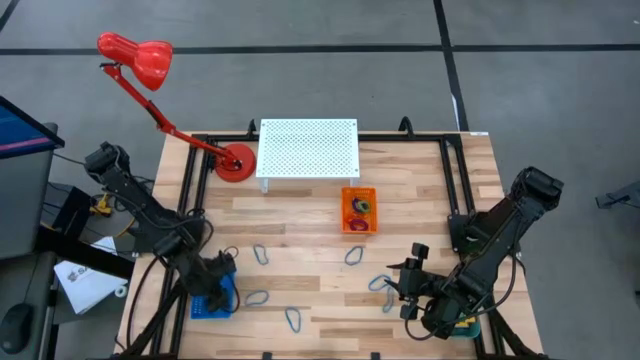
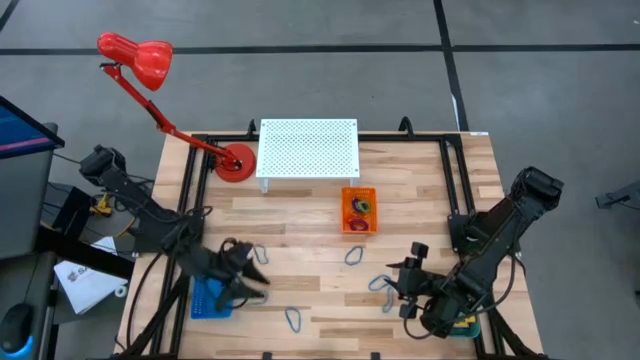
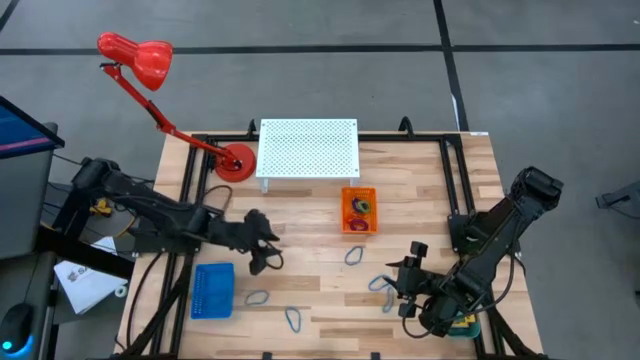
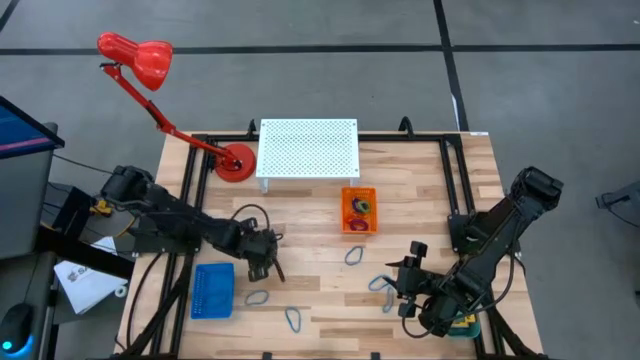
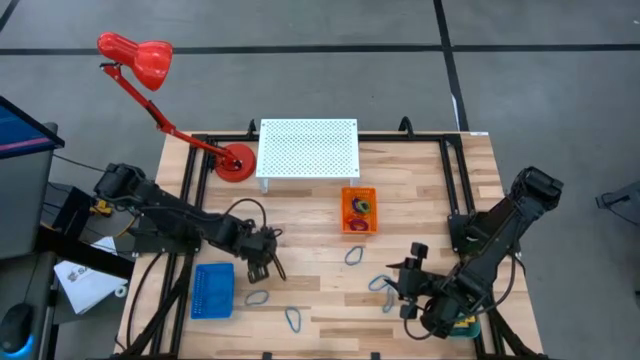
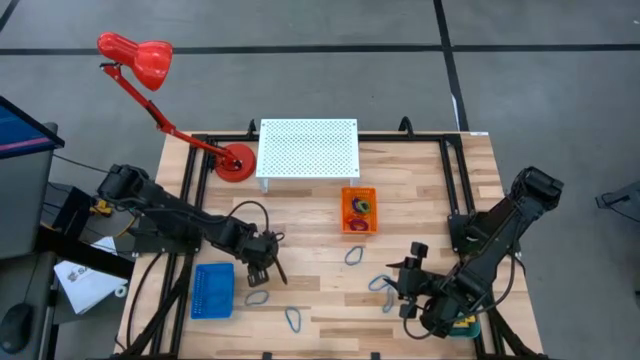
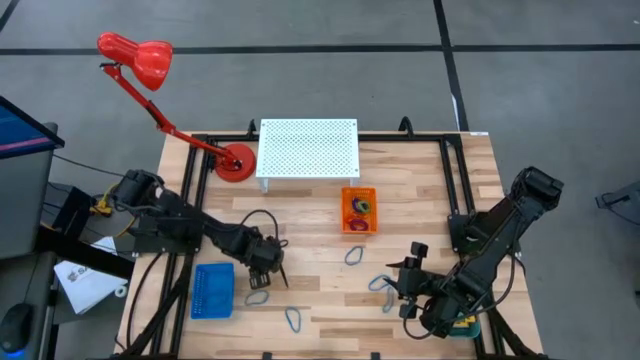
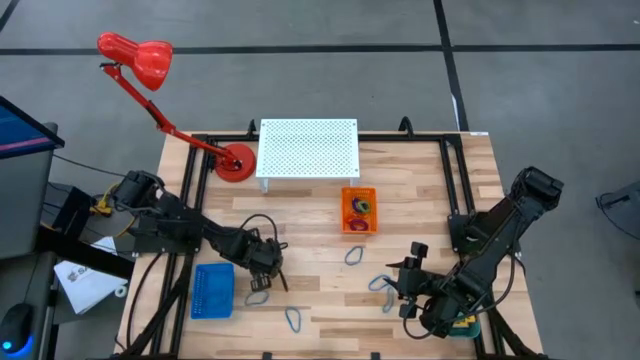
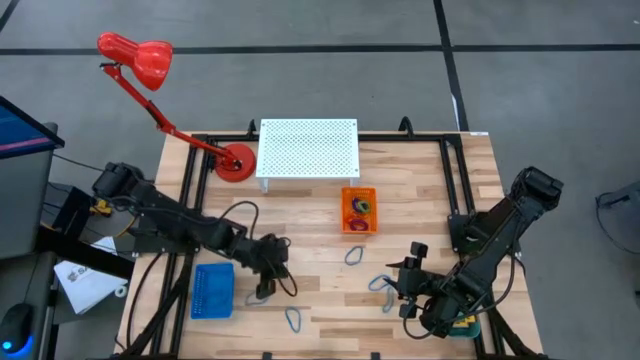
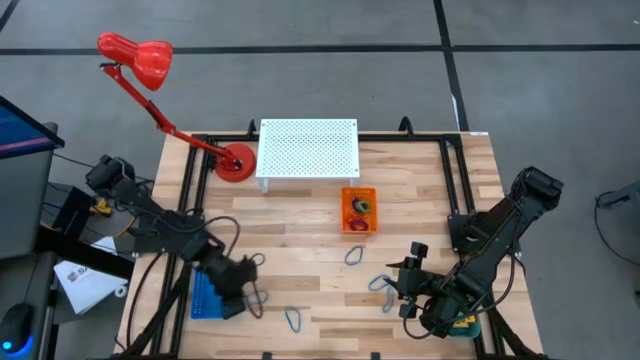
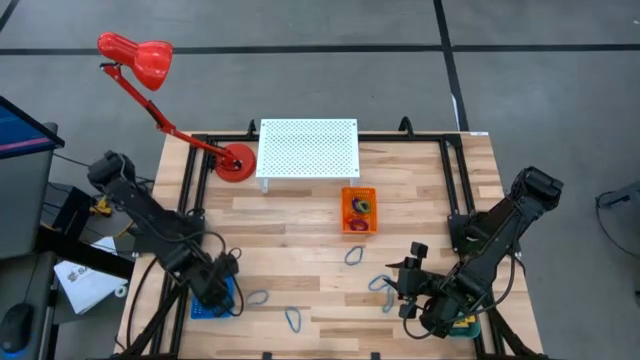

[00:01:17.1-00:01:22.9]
Task: Pick & Place Office Desk Supplies
Put the blue rubber band into the blue bin

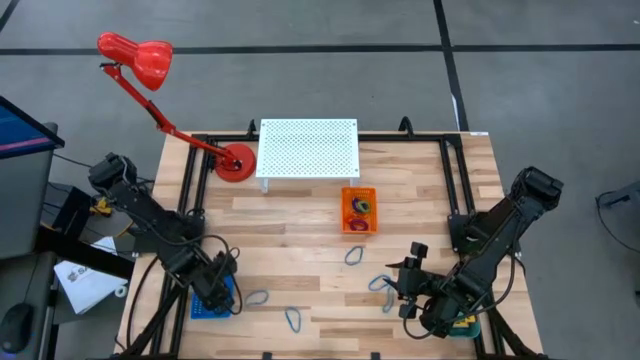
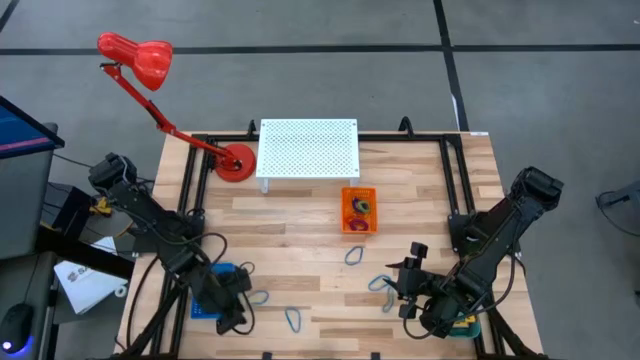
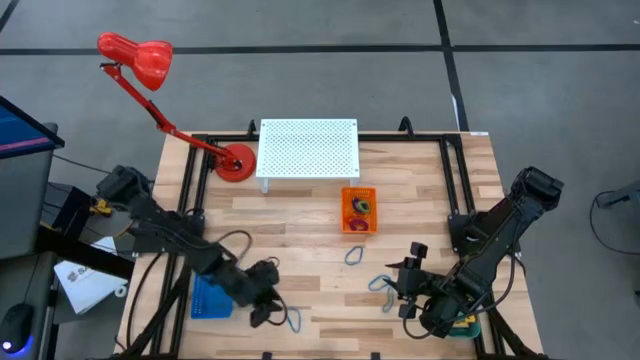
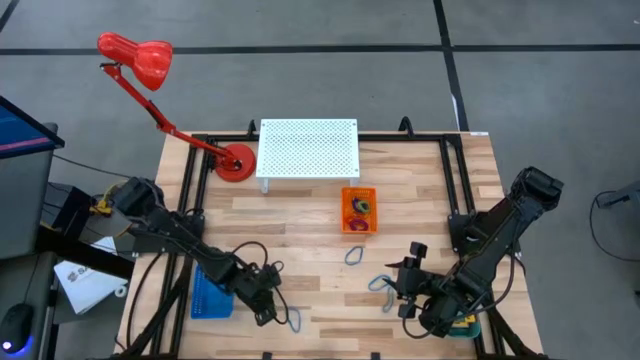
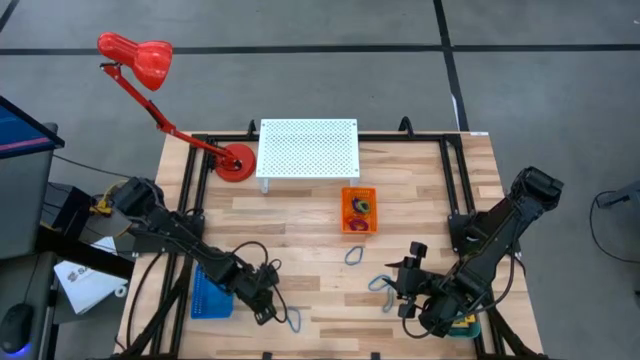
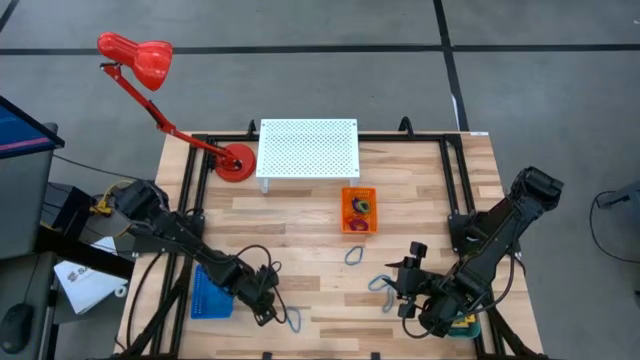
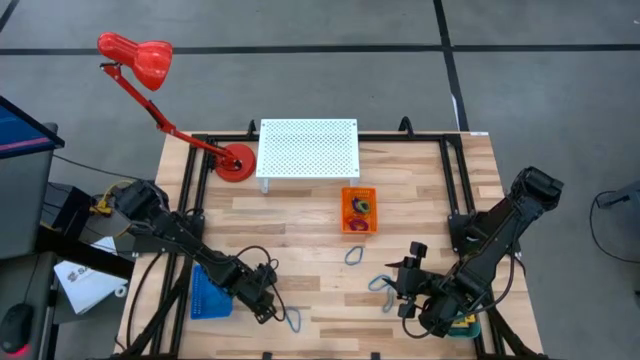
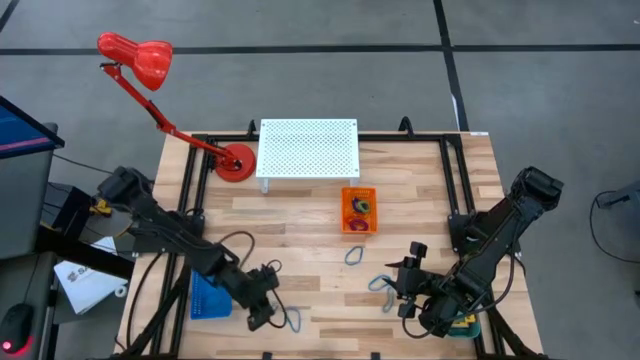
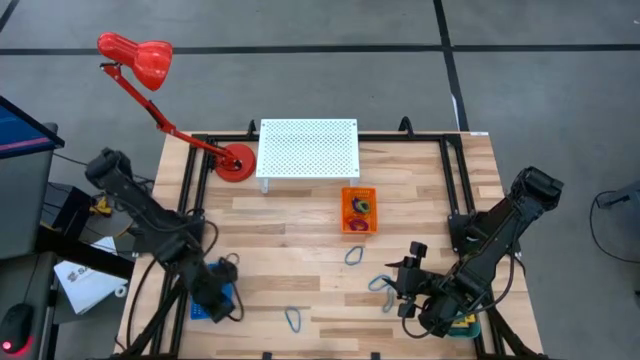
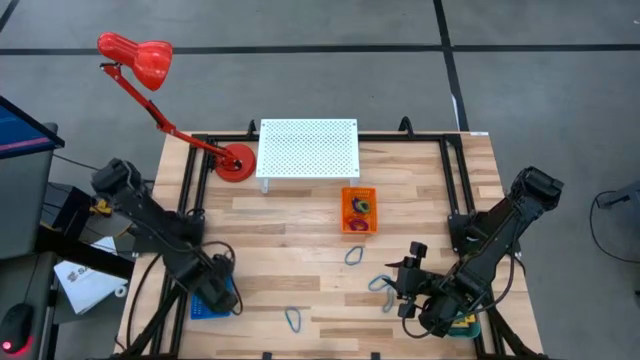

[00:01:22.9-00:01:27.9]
Put the blue rubber band into the blue bin

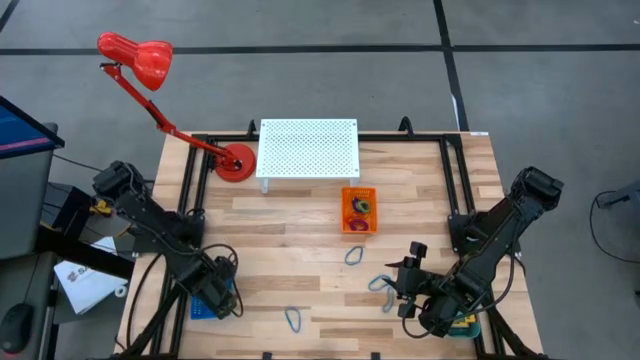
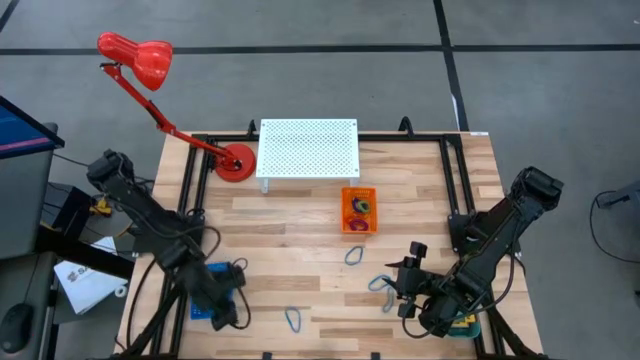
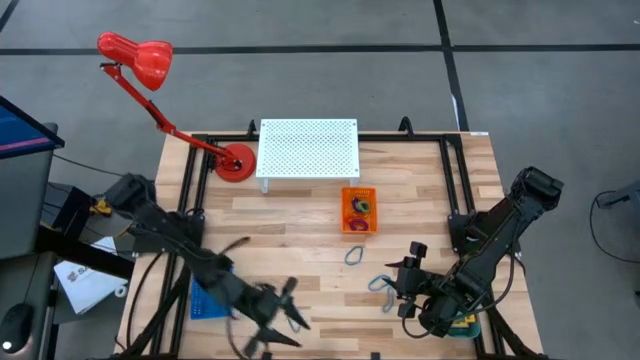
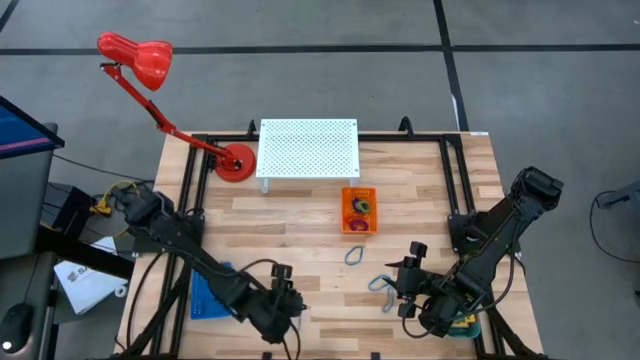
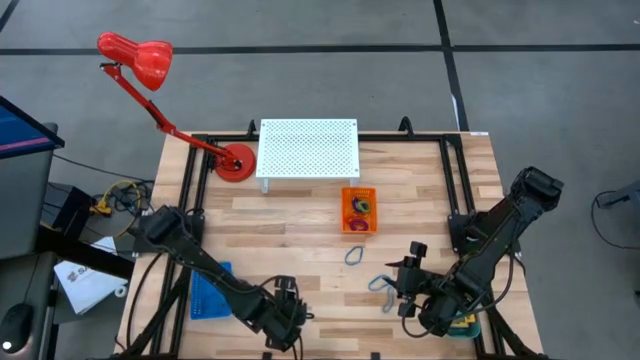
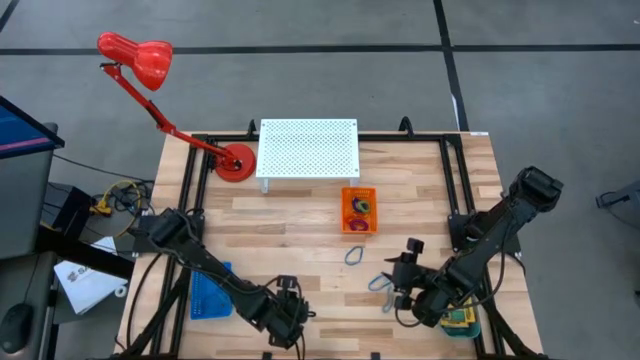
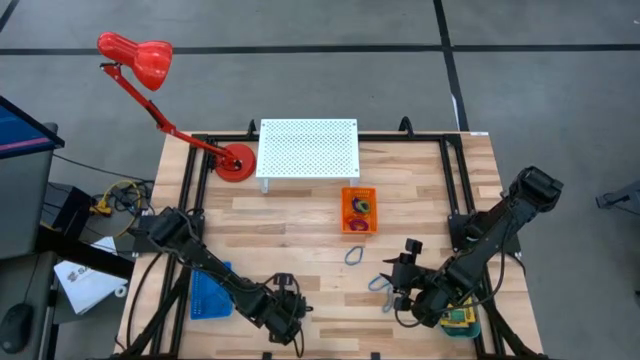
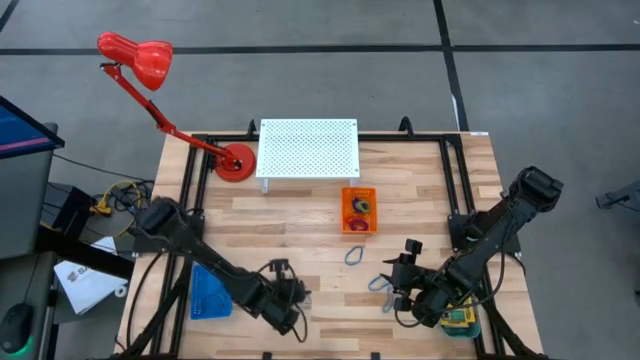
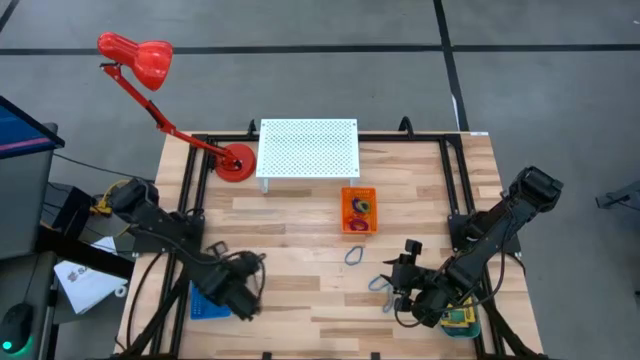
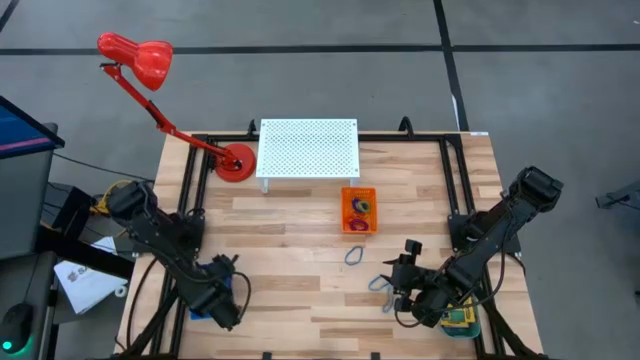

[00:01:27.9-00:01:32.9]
Put the blue rubber band into the blue bin

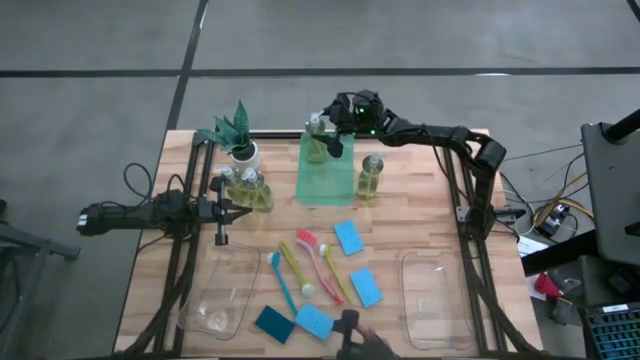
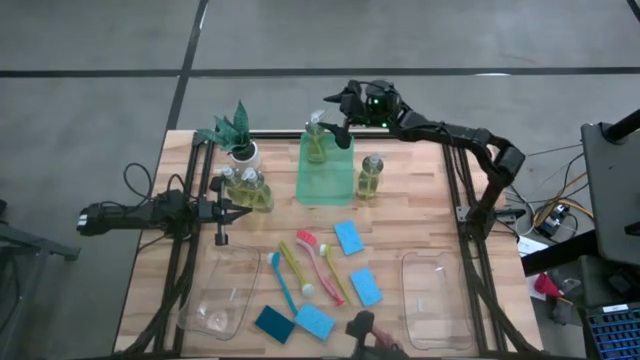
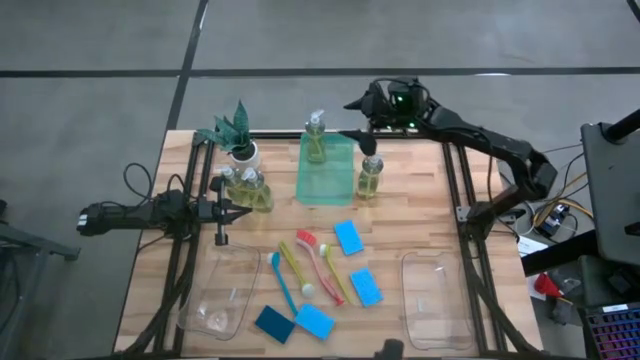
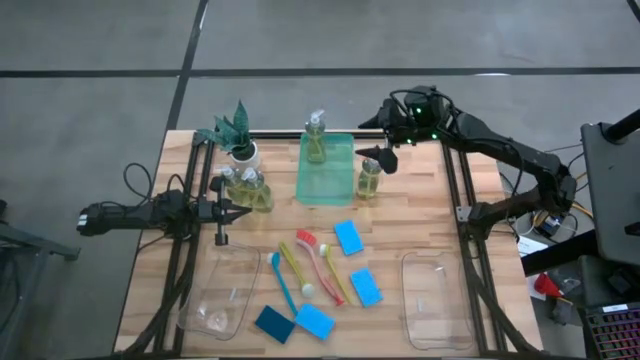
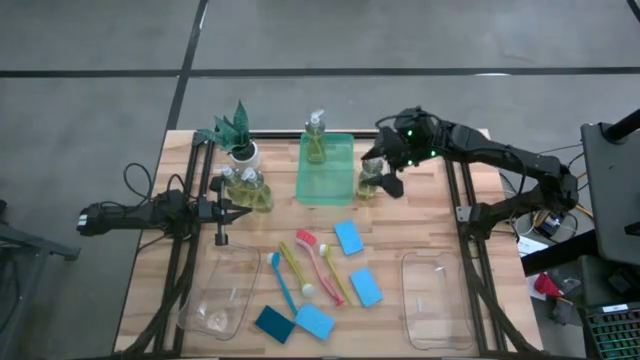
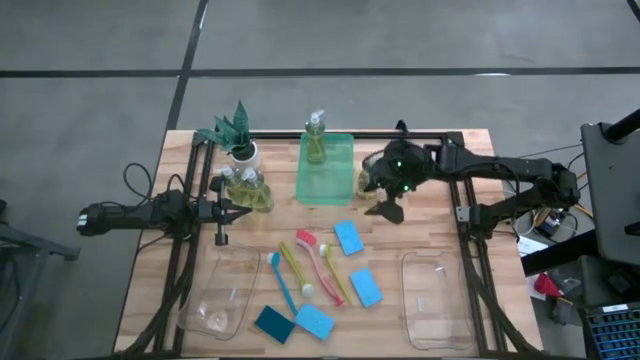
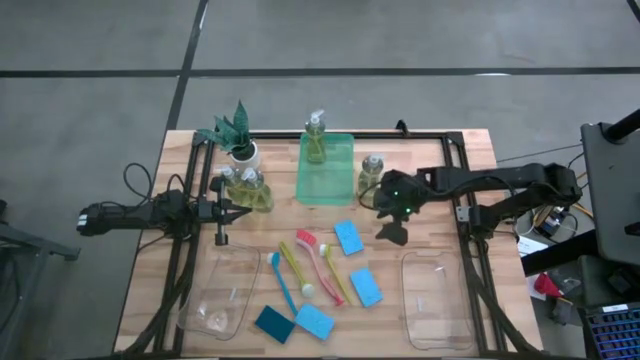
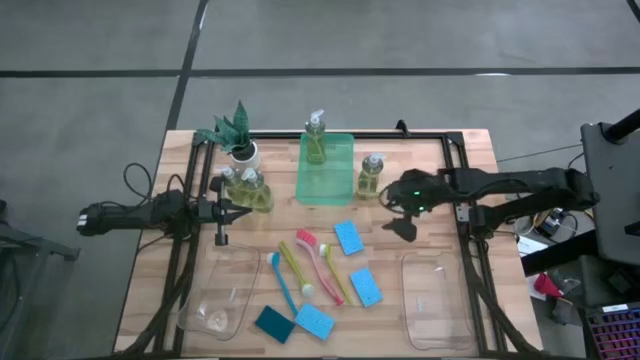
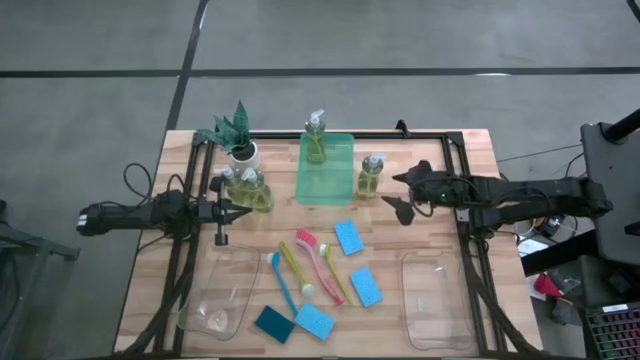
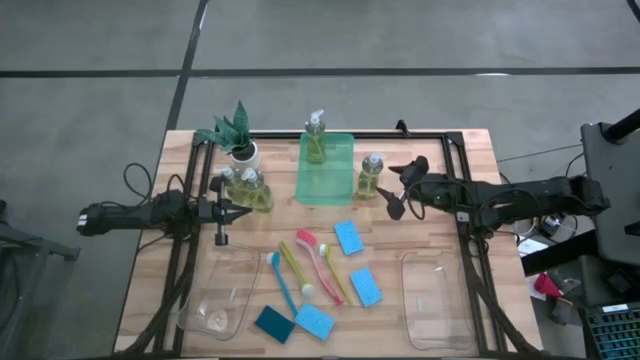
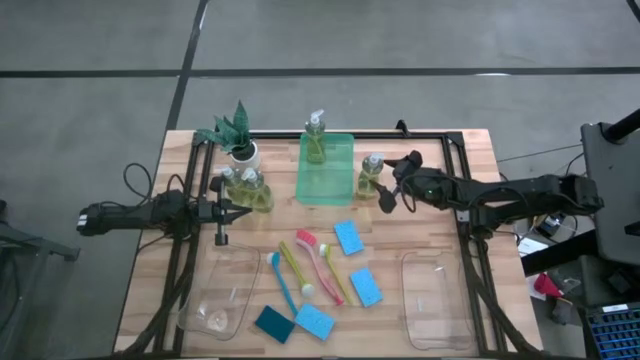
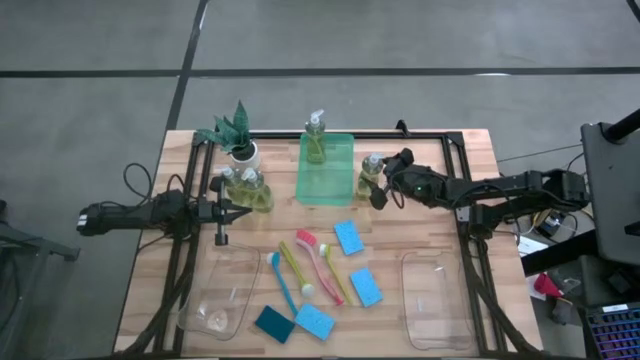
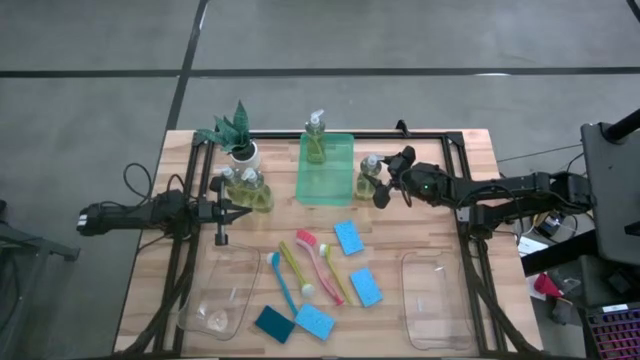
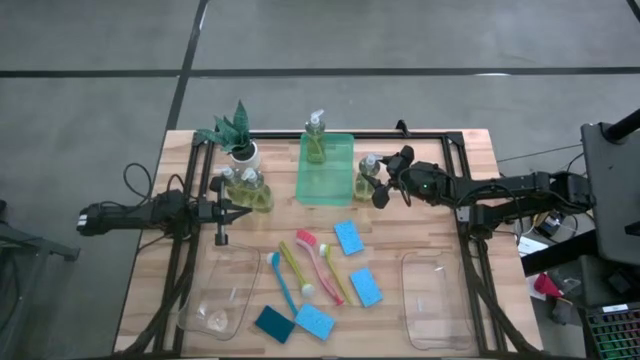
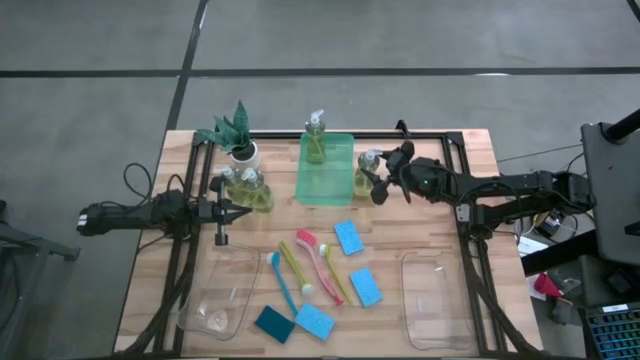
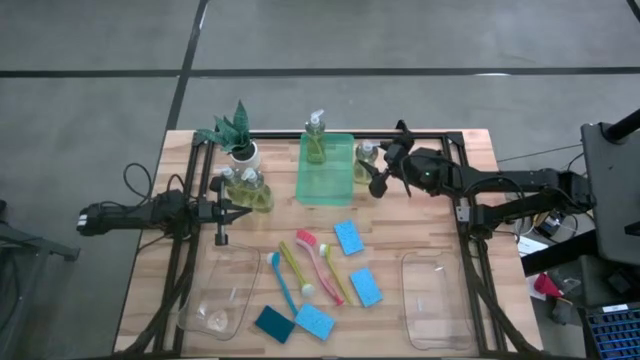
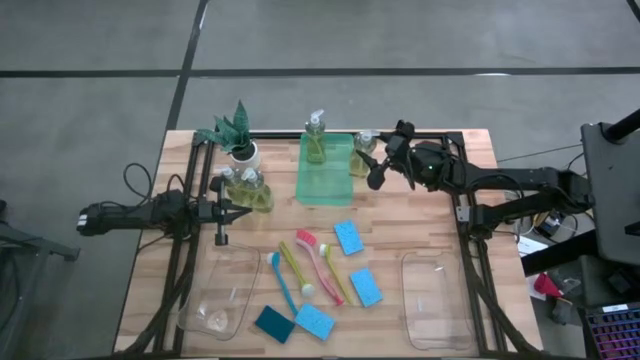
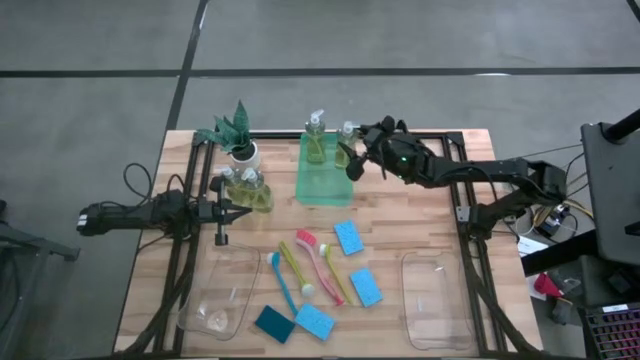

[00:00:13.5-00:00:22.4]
Task: Pick & Place Kitchen Sink Supplies
Put the top right dishwashing liquid into the green bin
